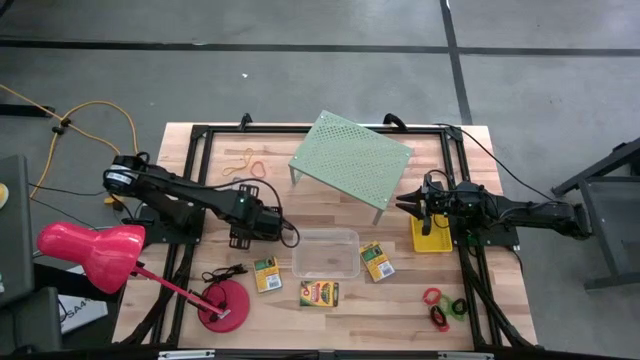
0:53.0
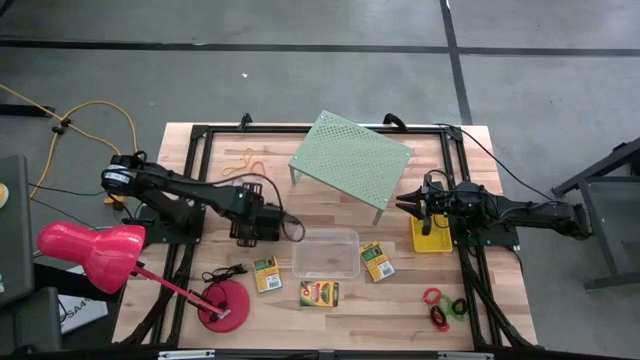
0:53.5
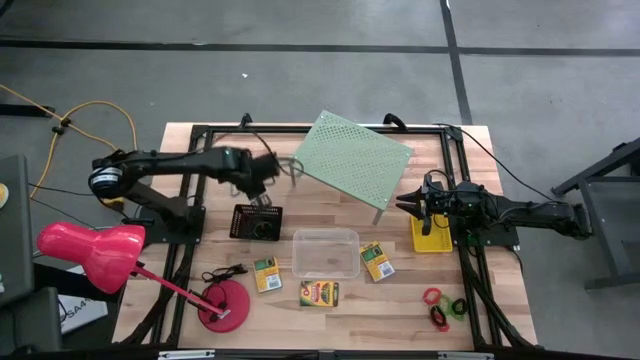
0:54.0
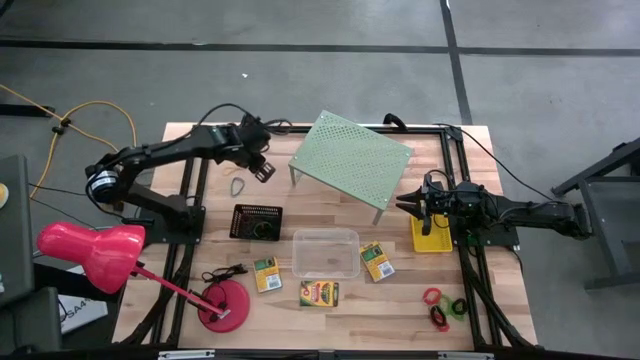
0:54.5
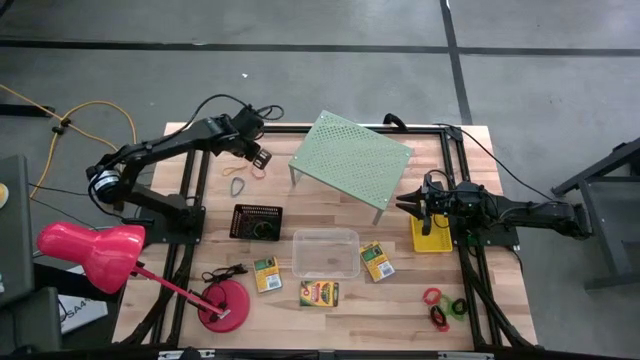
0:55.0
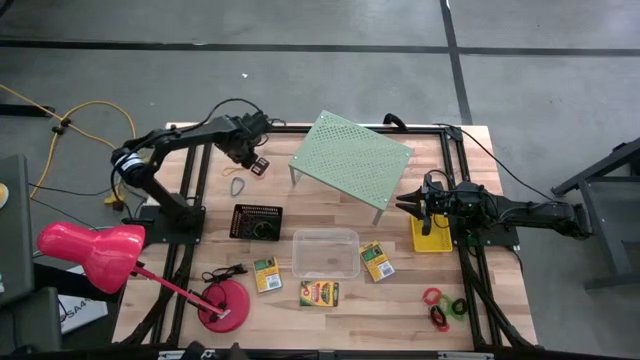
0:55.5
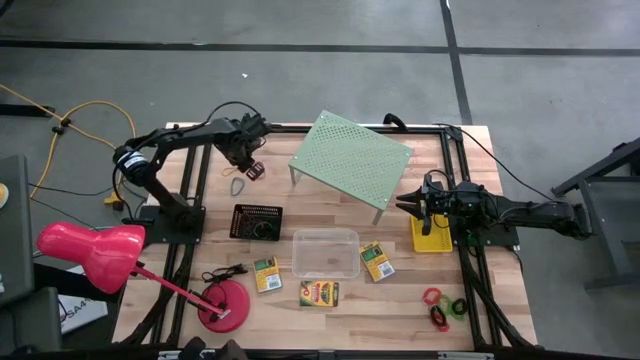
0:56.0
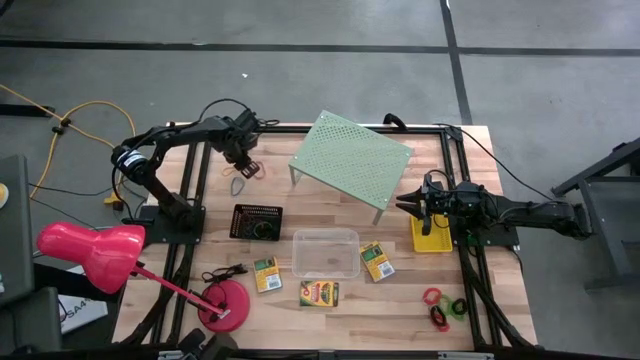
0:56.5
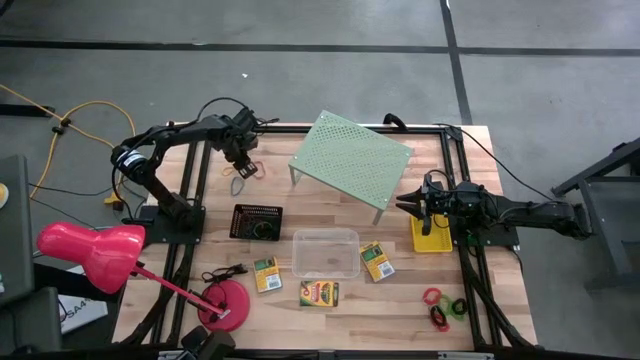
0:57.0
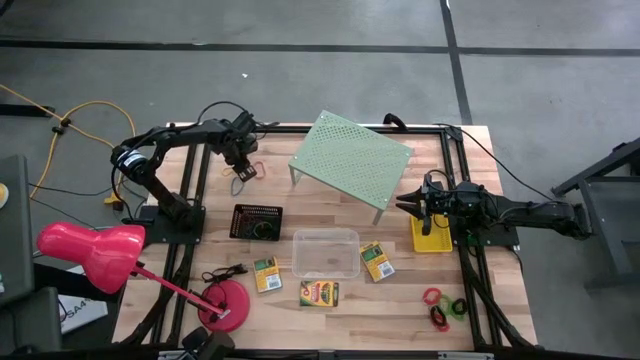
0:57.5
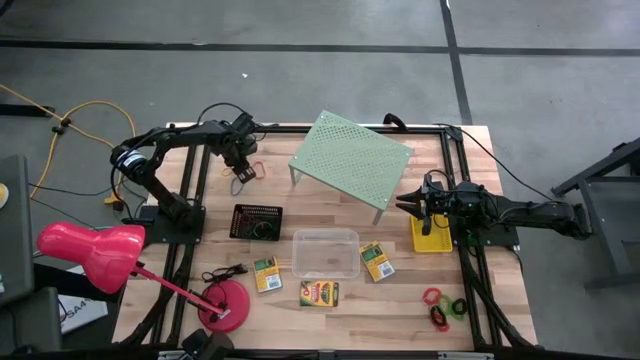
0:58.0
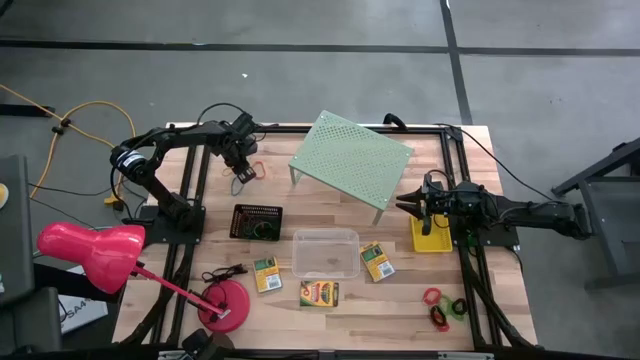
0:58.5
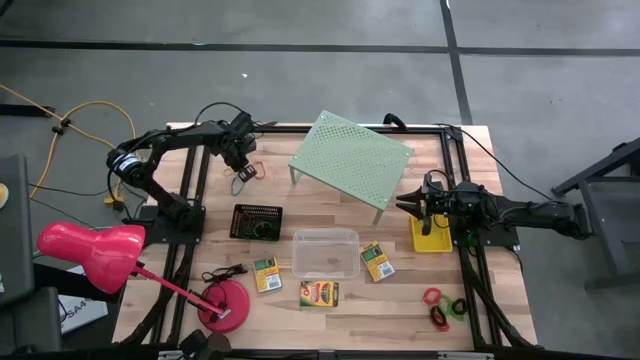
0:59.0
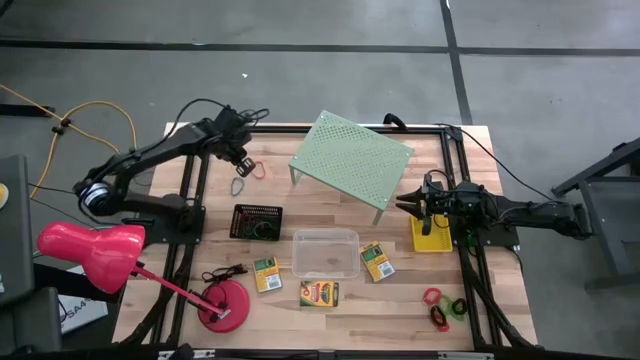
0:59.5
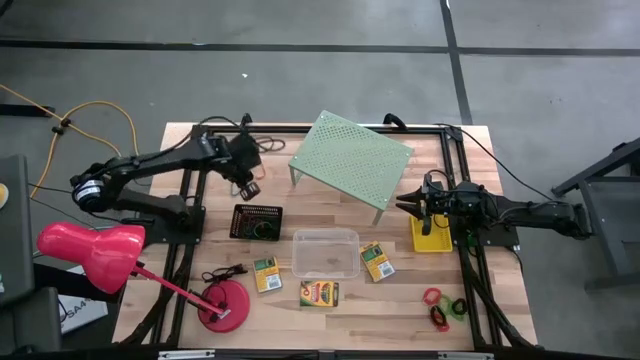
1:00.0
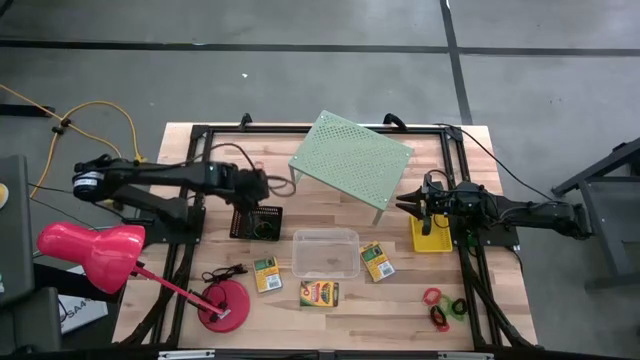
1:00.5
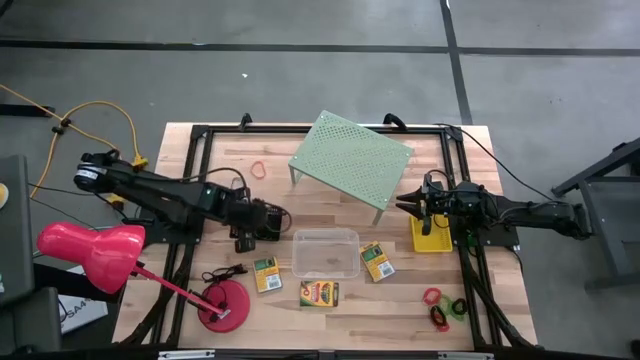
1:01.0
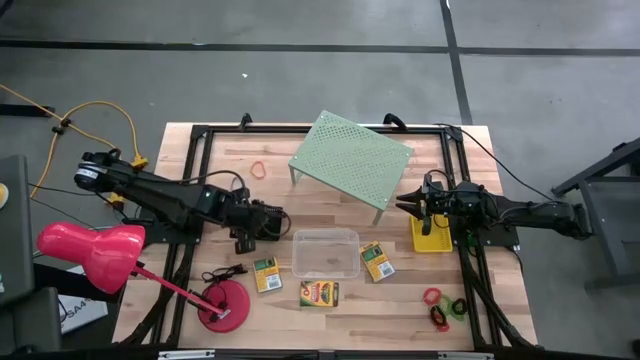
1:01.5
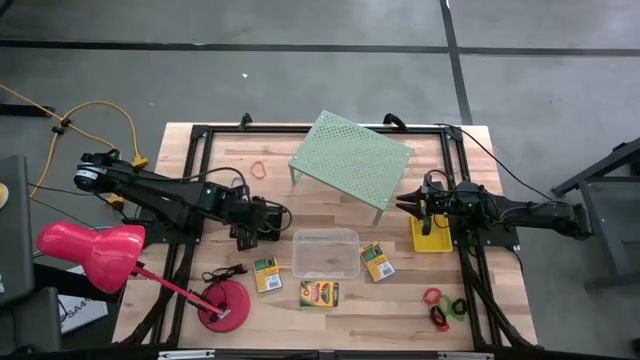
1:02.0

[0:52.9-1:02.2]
Task: Pick & Place Office Desk Supplies
Put the yellow rubber band into the black bin

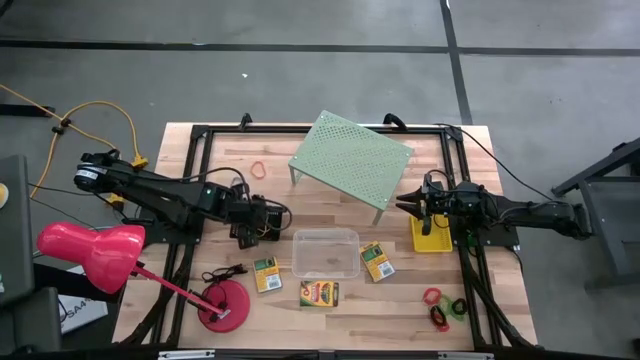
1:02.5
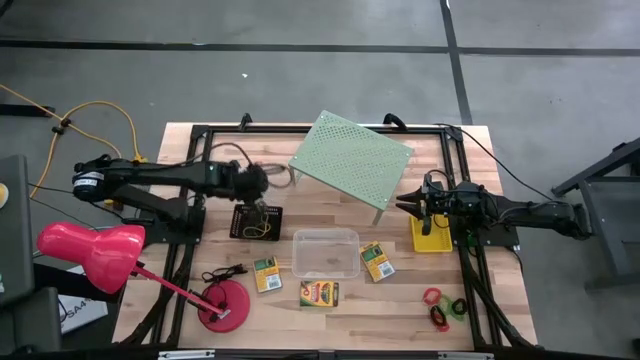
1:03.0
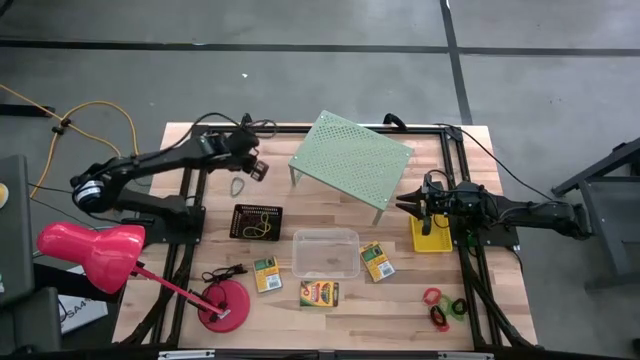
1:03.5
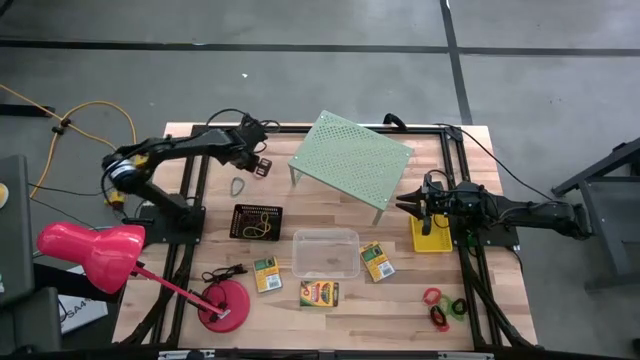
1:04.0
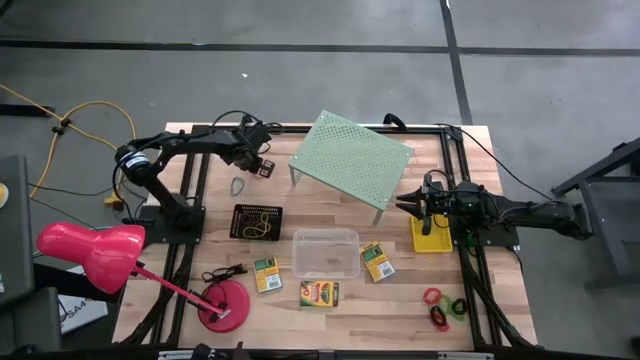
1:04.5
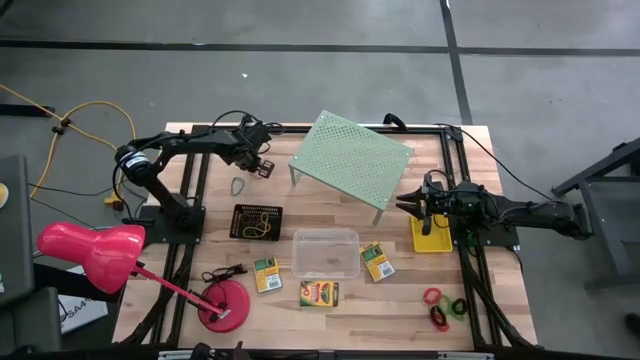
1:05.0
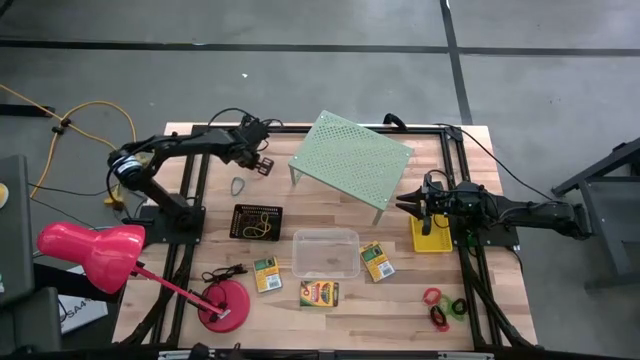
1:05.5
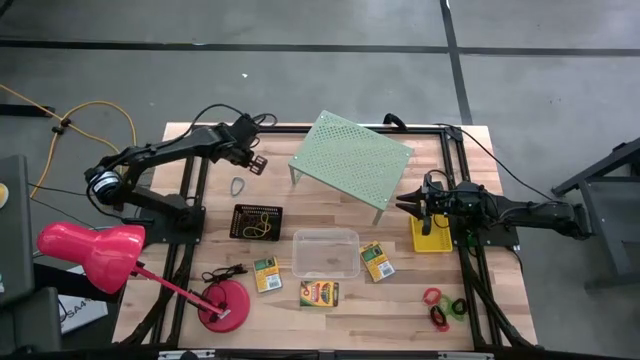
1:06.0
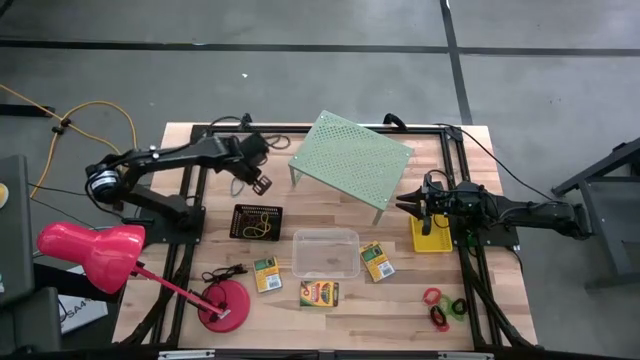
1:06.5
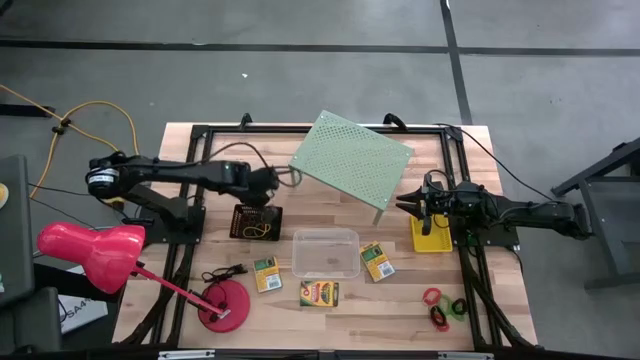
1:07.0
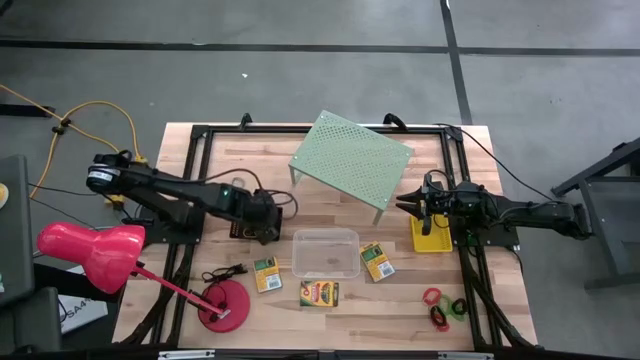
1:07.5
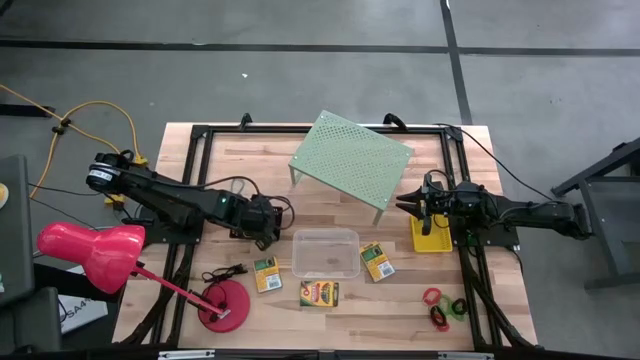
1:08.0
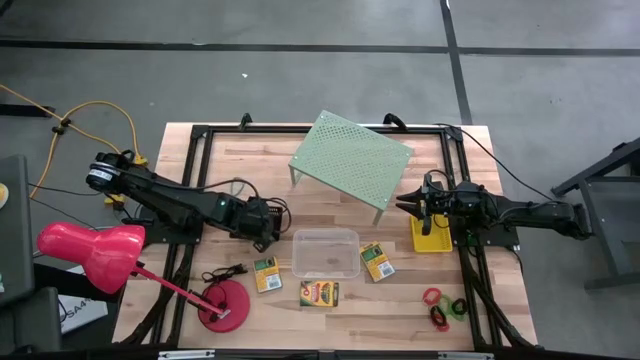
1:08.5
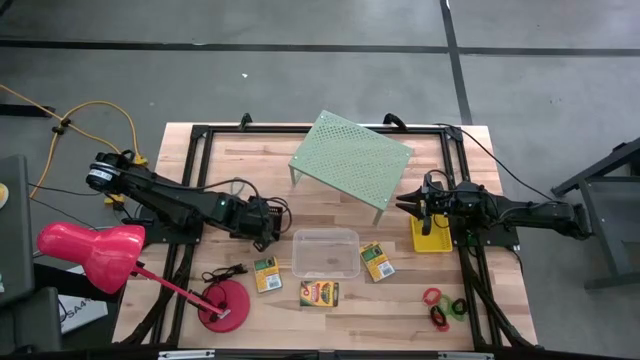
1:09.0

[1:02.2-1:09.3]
Put the orange rubber band into the black bin

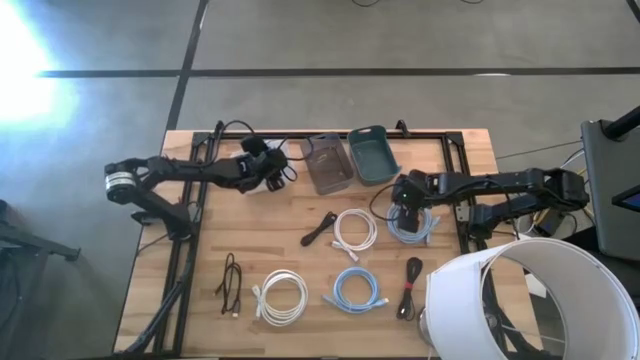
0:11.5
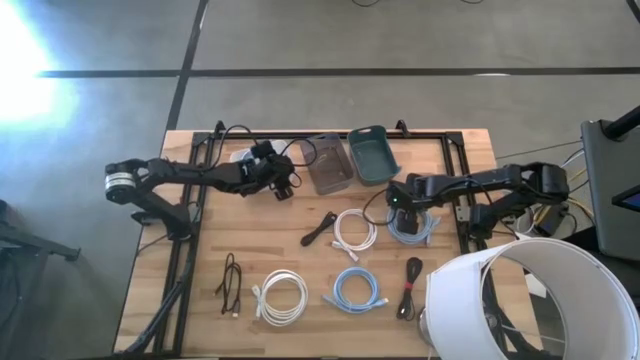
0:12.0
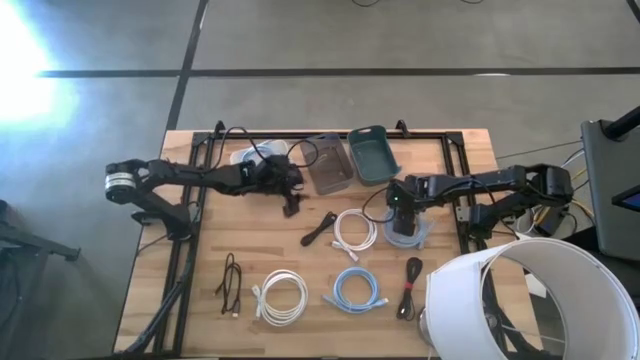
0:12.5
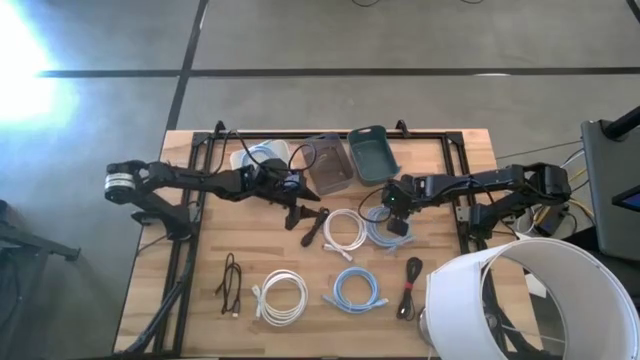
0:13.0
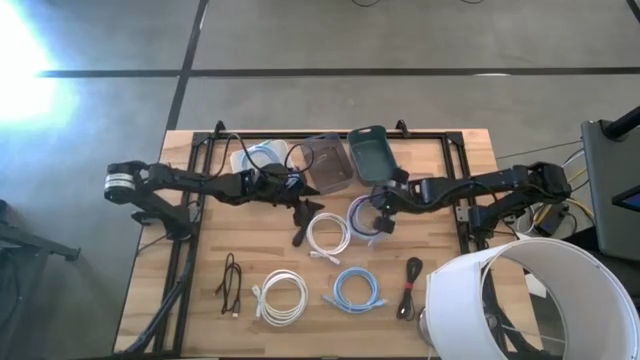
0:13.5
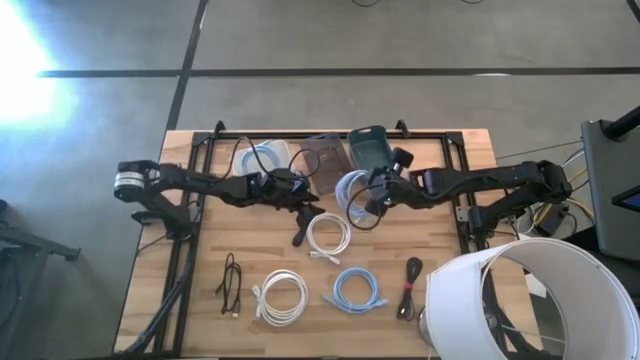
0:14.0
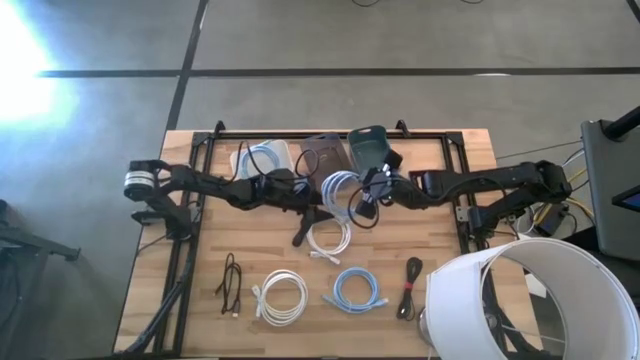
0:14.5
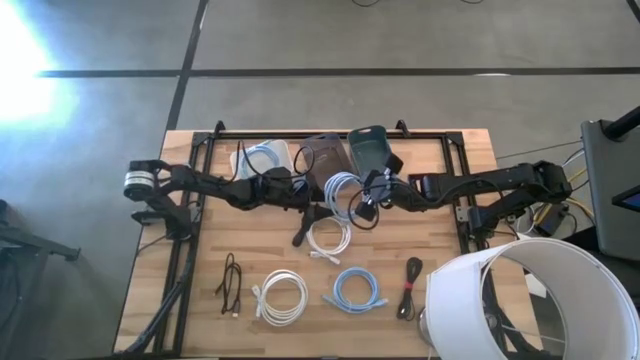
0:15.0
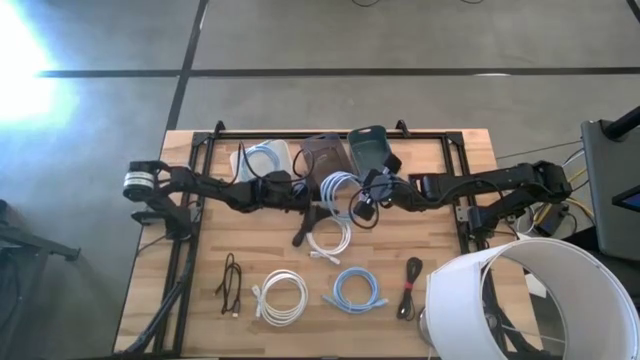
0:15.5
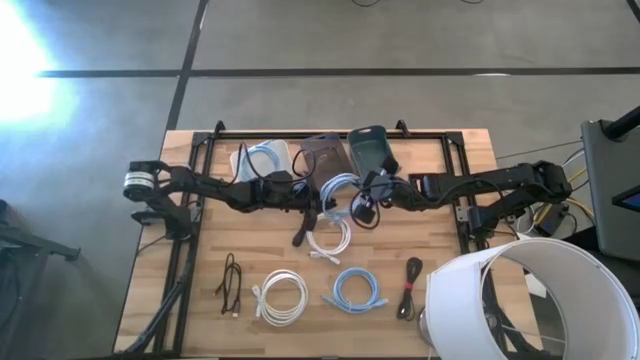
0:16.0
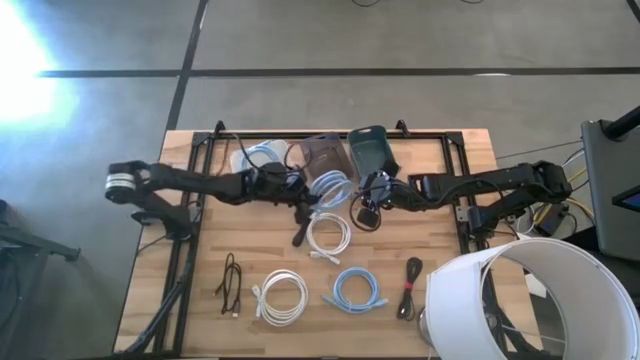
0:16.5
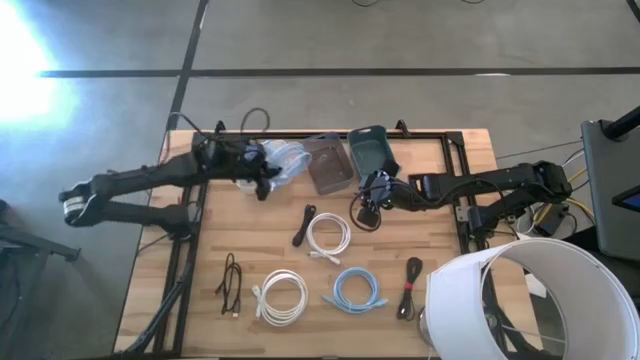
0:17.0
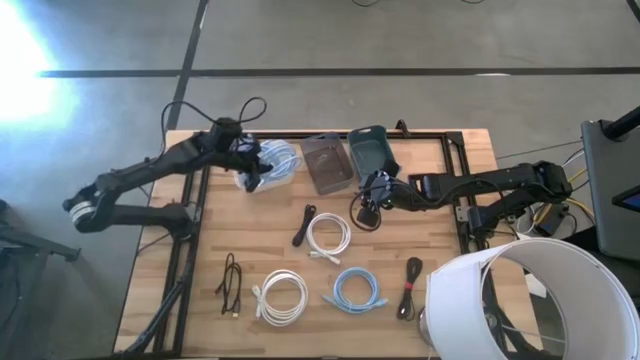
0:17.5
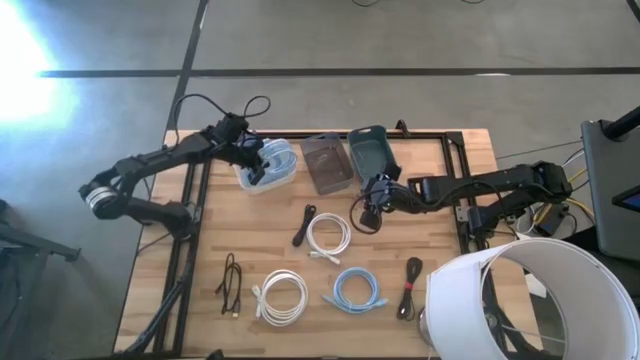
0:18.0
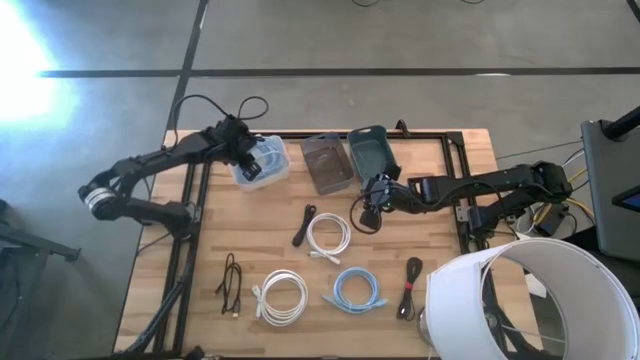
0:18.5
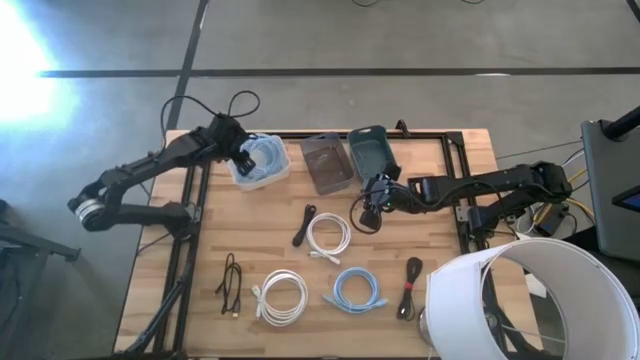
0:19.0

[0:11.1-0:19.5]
Task: Pick & Place USB Port
Put the top blue USB cable into the white bin
